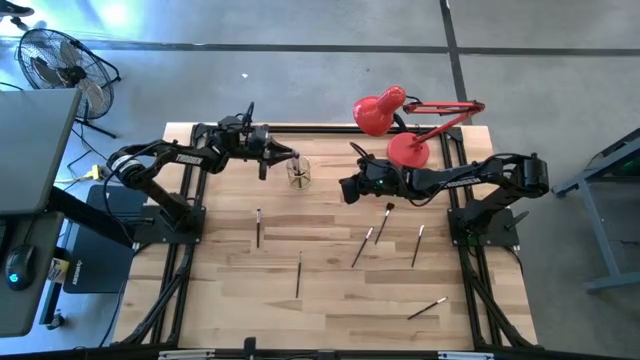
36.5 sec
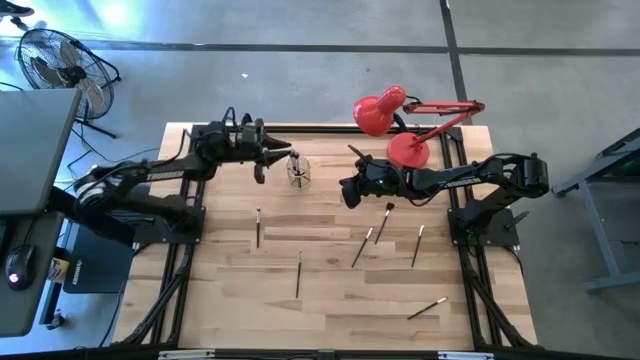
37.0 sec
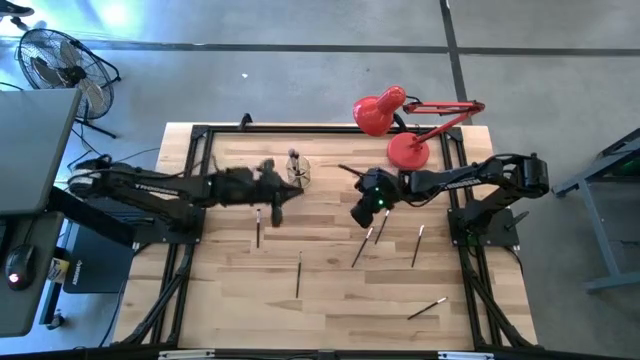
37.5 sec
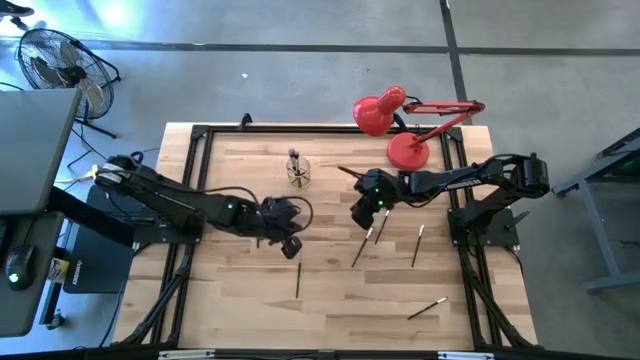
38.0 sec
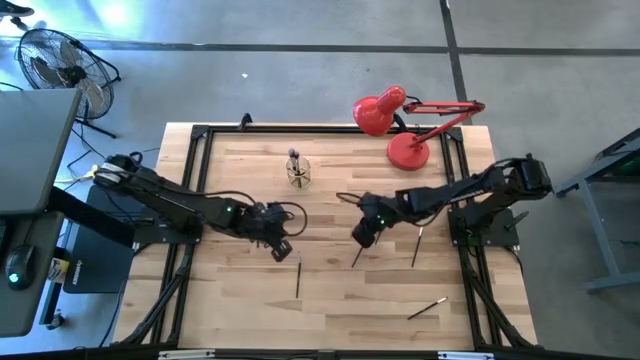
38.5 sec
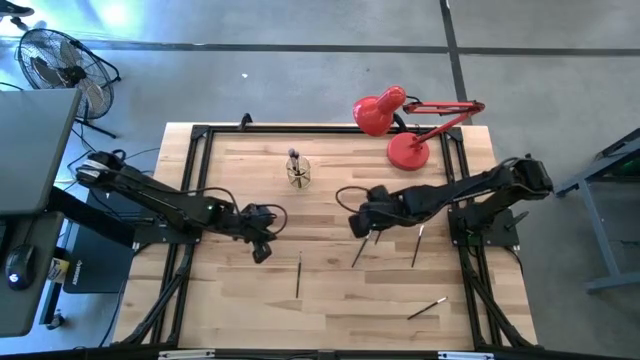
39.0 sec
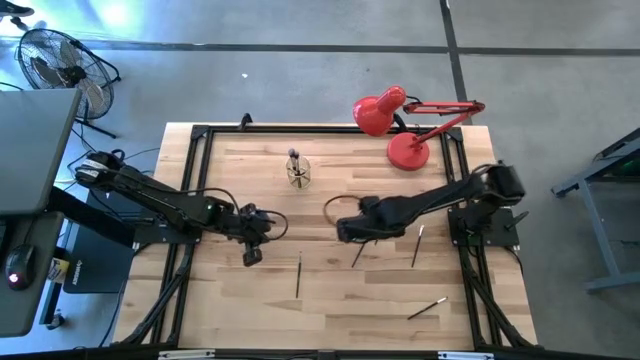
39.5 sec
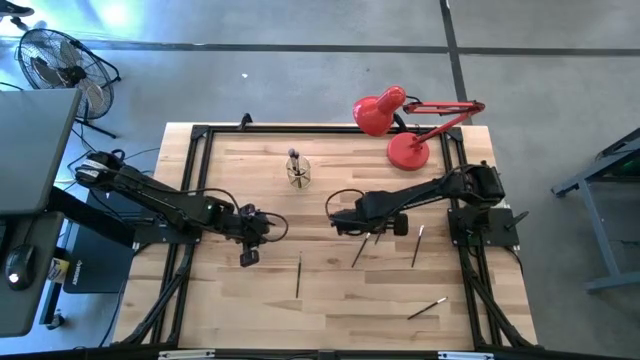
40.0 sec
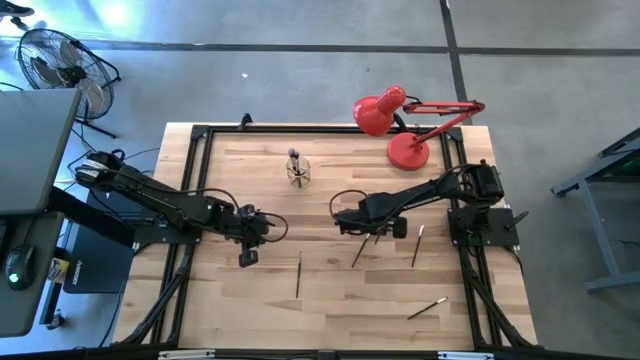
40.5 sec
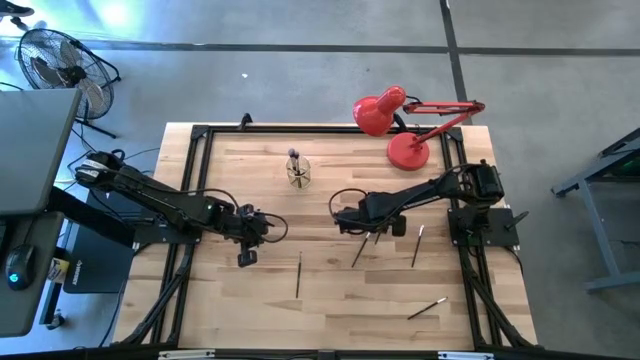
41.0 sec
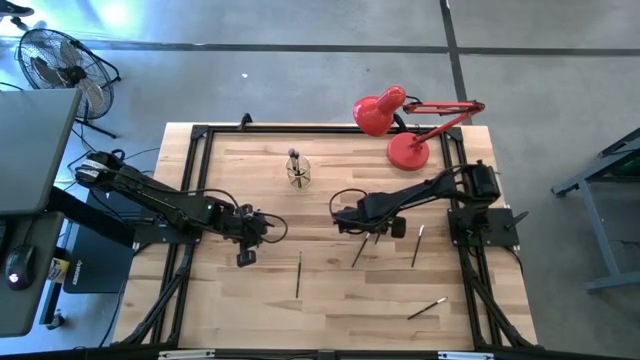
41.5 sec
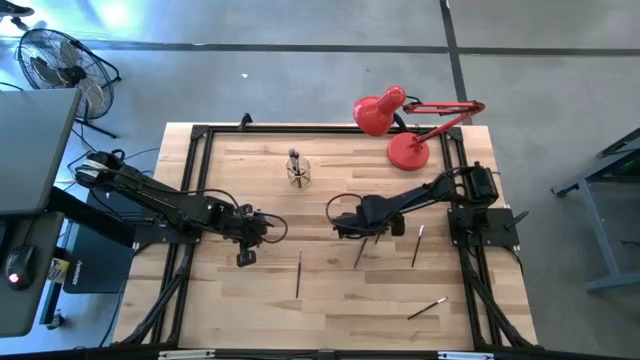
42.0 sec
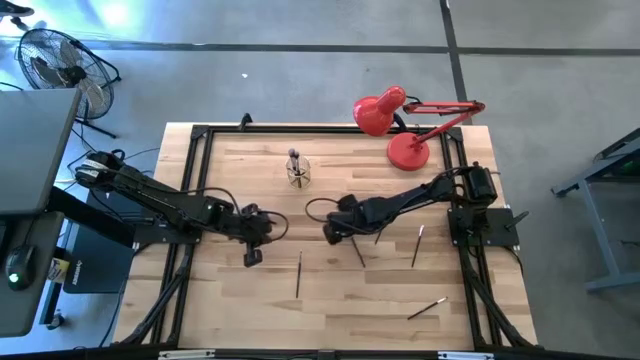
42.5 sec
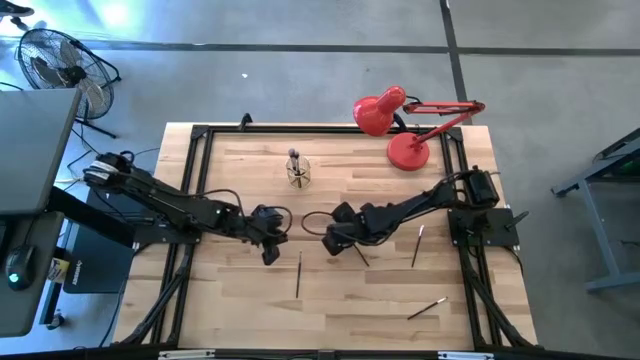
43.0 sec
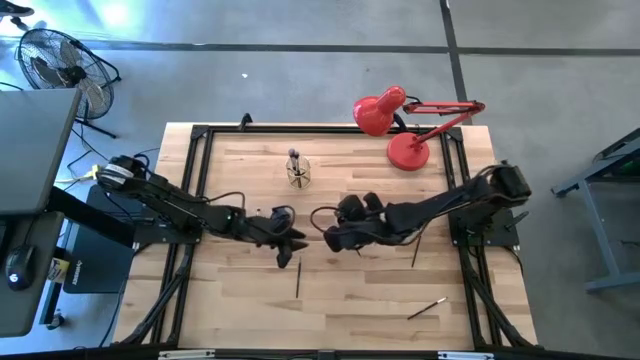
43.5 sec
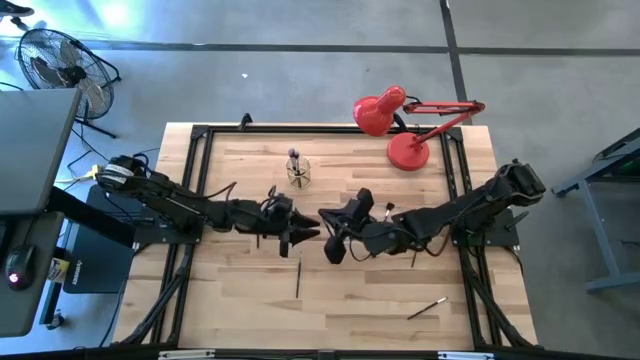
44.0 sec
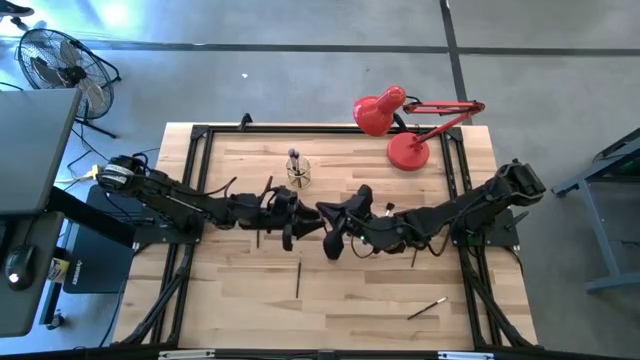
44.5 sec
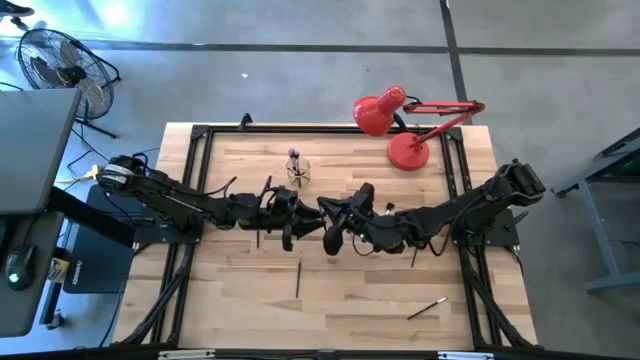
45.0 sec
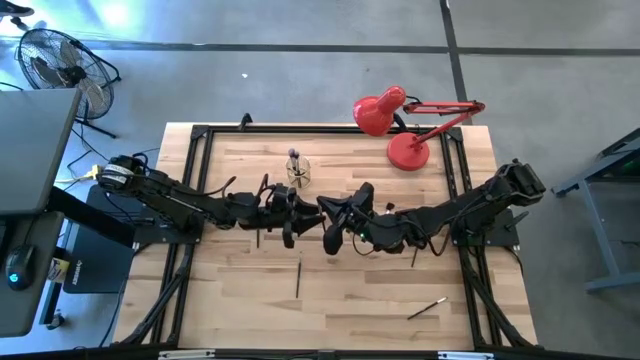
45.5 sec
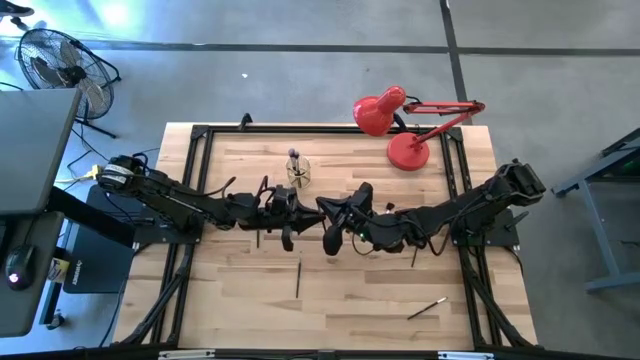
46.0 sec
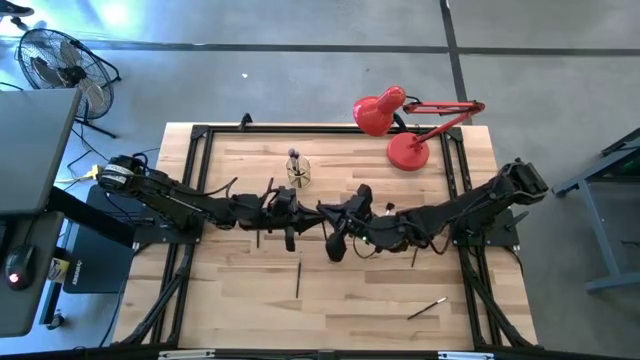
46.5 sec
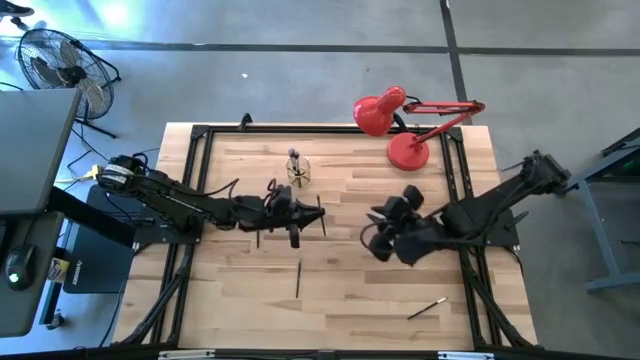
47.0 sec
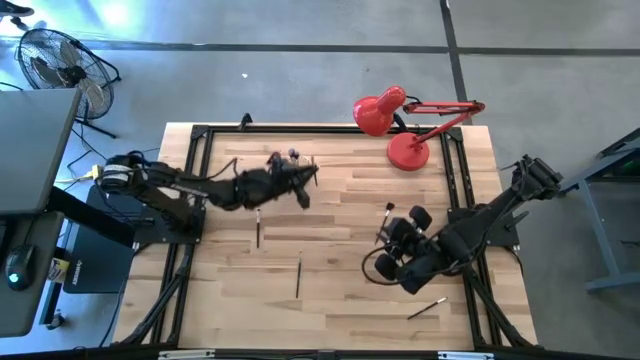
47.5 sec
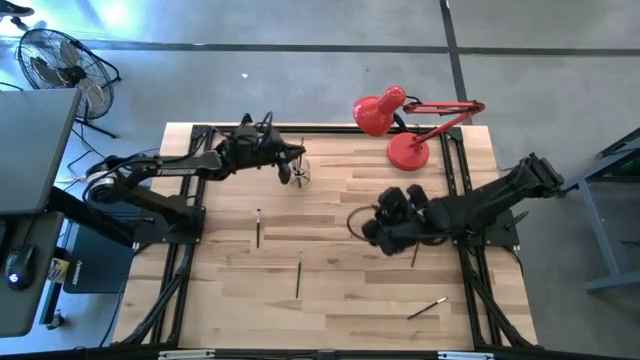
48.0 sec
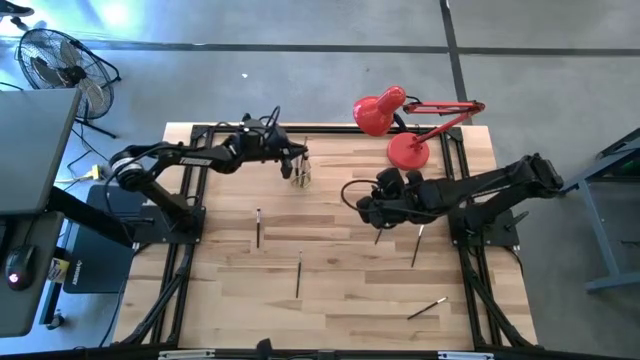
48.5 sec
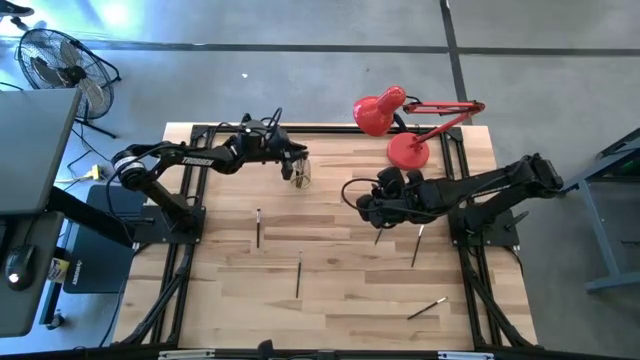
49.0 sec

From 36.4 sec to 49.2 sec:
Task: Put items in baskets/containers
Put the eyeshadow brush into the wire organizer

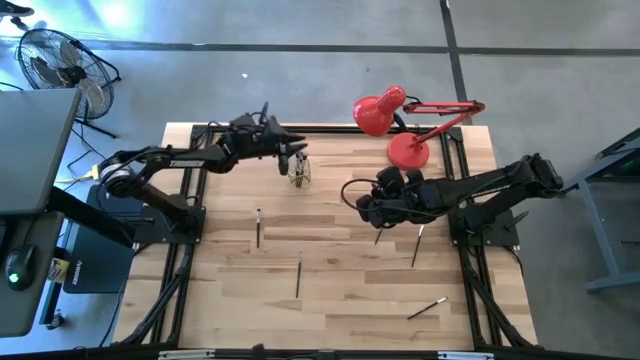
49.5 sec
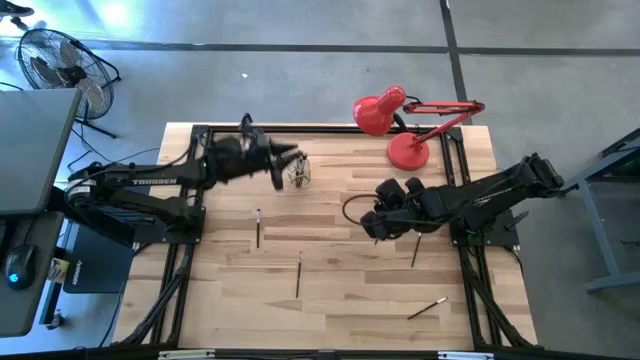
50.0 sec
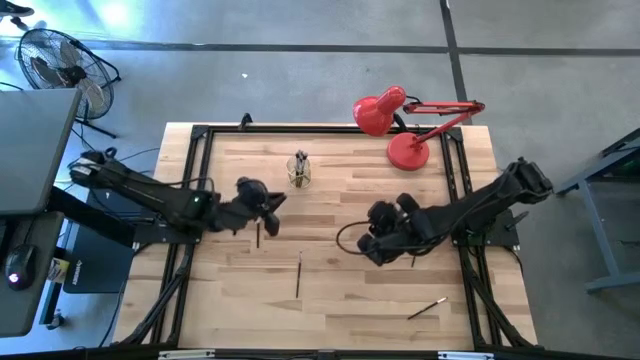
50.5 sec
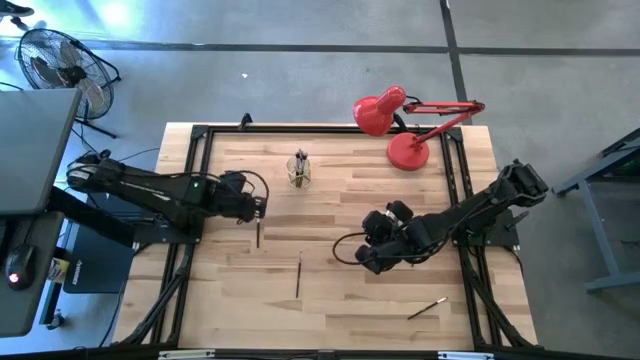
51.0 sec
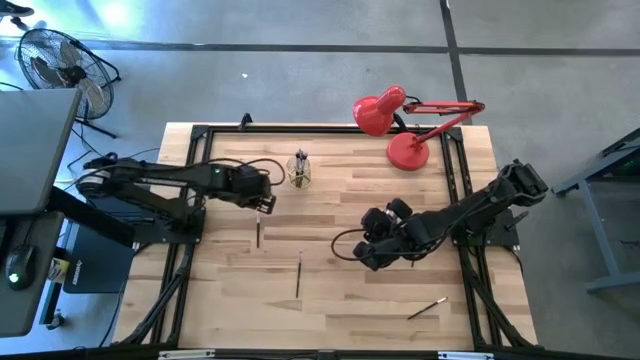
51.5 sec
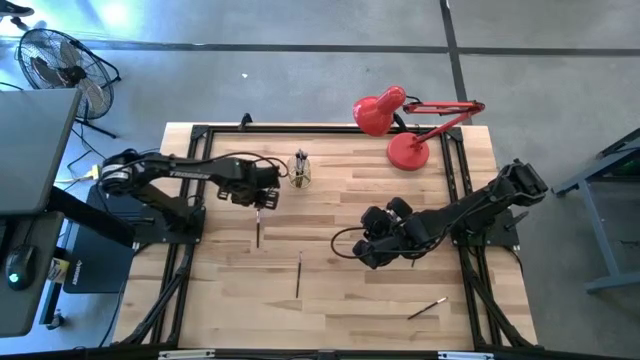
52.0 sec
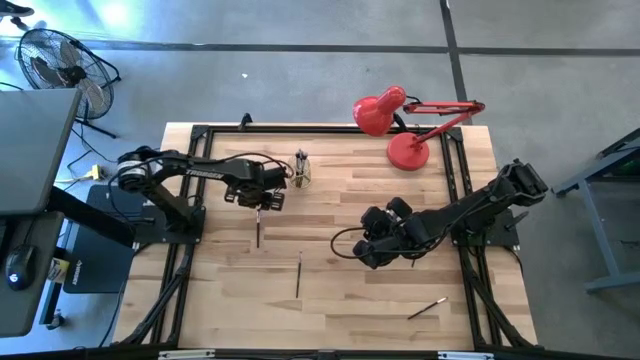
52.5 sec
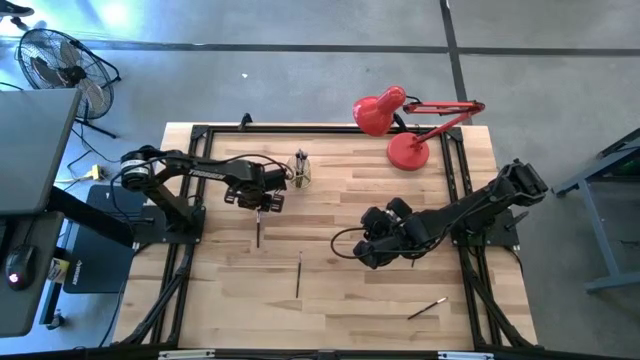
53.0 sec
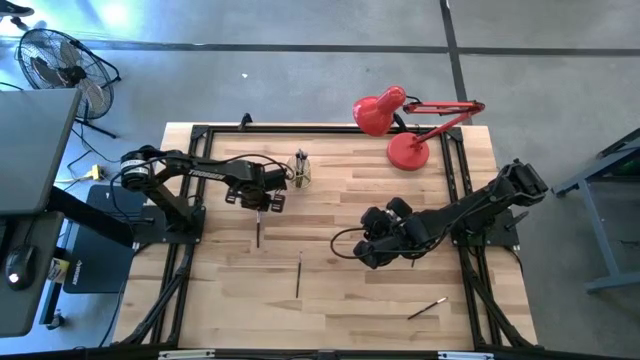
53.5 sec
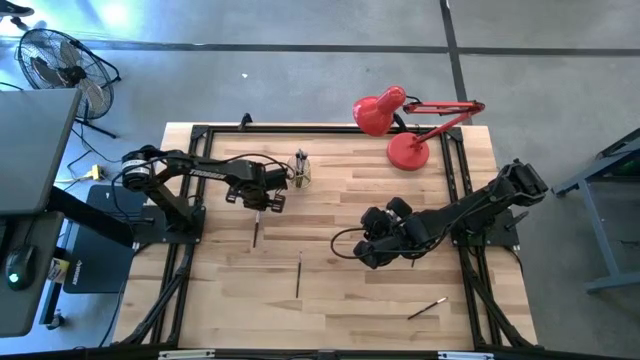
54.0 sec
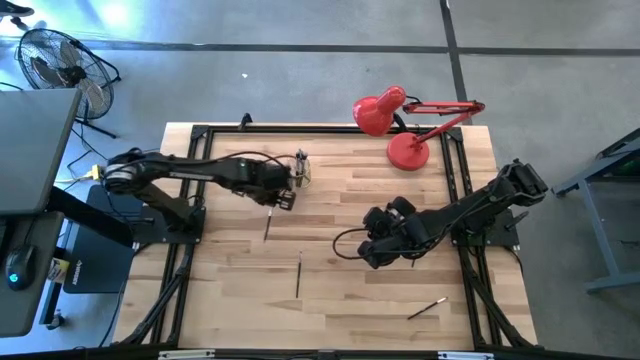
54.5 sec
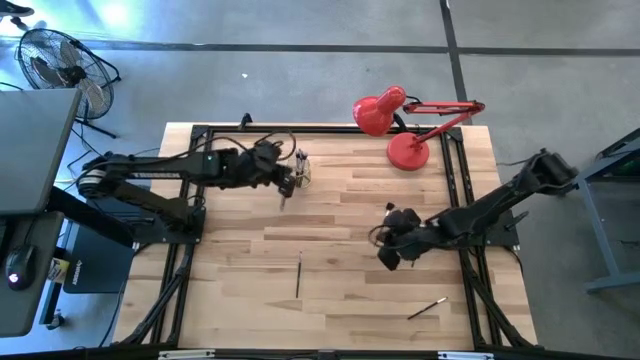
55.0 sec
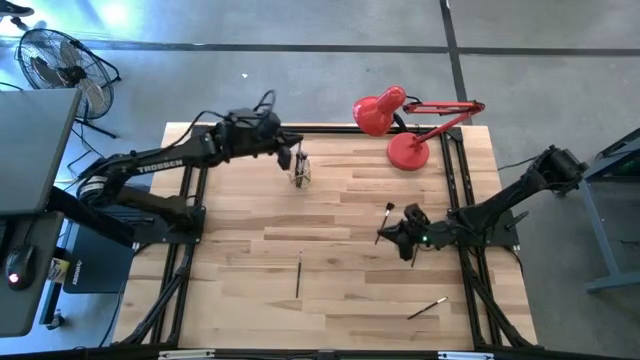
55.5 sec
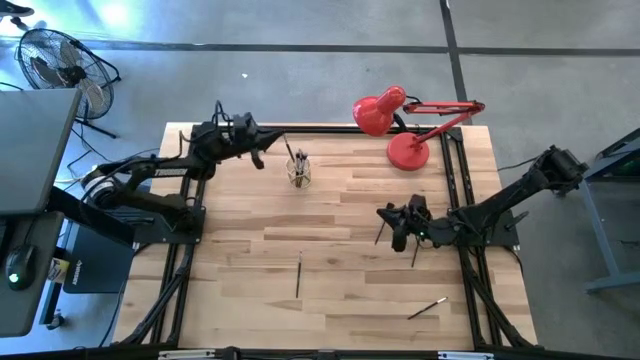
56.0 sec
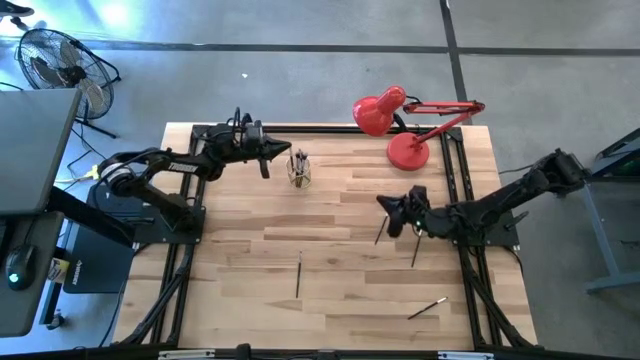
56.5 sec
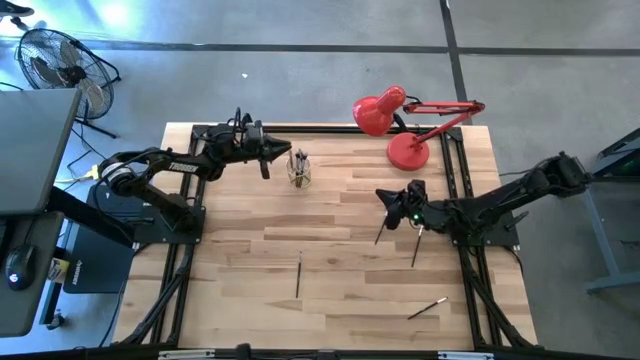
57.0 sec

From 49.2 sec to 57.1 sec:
Put the eyeshadow brush into the wire organizer
